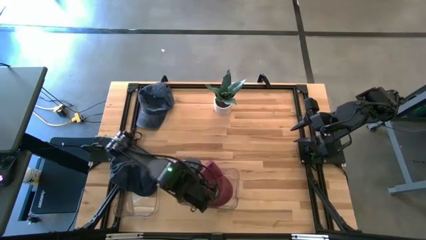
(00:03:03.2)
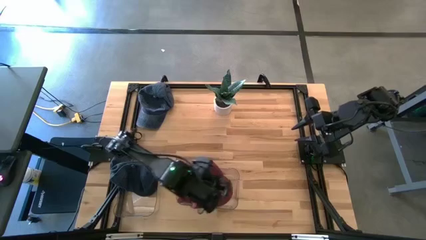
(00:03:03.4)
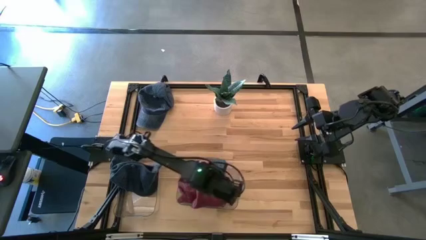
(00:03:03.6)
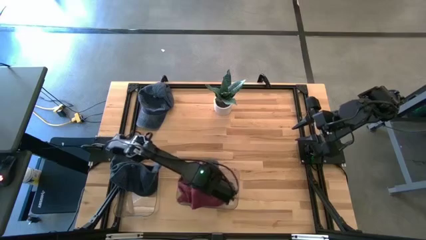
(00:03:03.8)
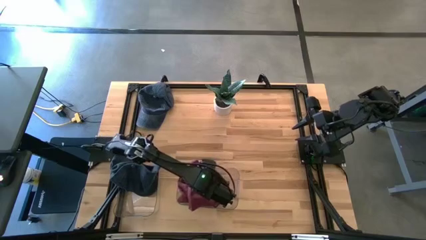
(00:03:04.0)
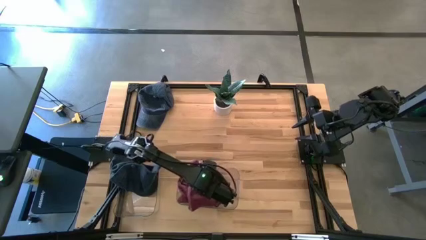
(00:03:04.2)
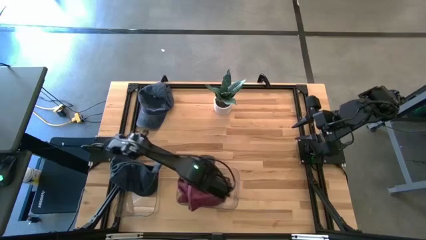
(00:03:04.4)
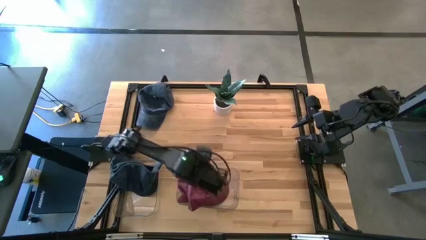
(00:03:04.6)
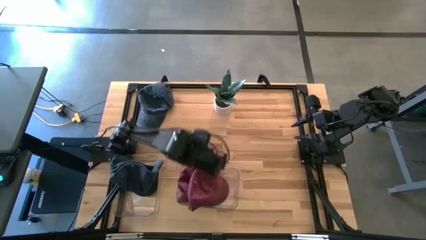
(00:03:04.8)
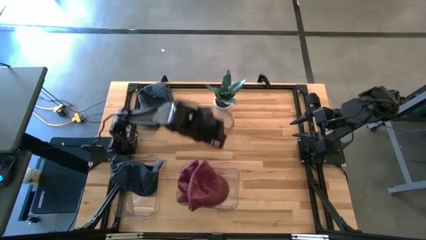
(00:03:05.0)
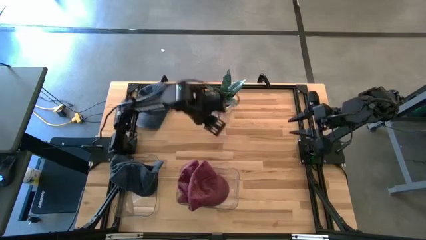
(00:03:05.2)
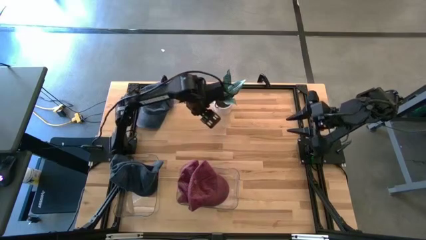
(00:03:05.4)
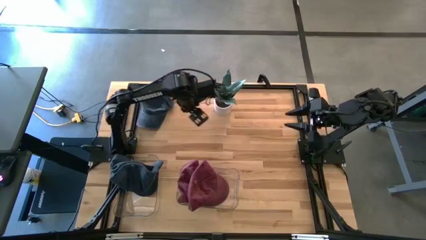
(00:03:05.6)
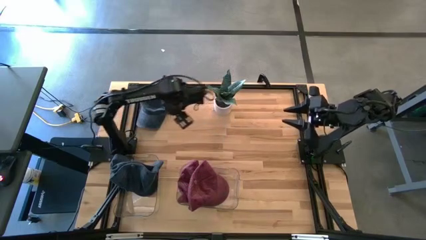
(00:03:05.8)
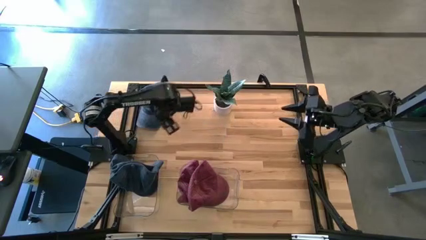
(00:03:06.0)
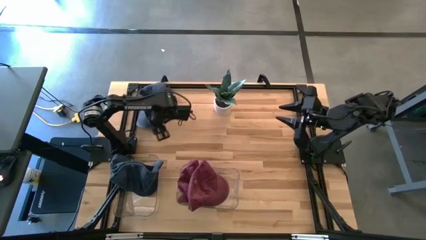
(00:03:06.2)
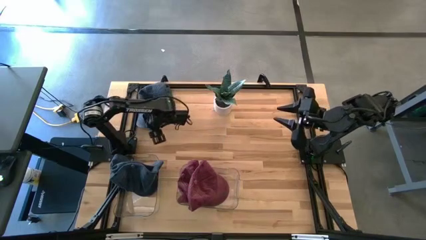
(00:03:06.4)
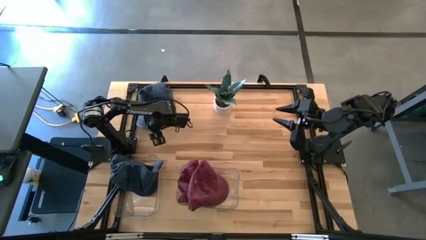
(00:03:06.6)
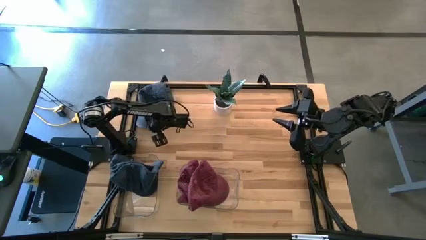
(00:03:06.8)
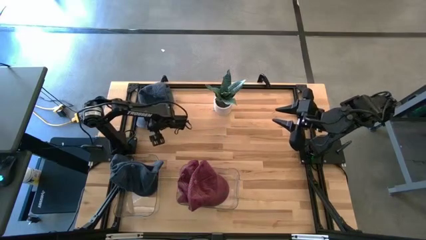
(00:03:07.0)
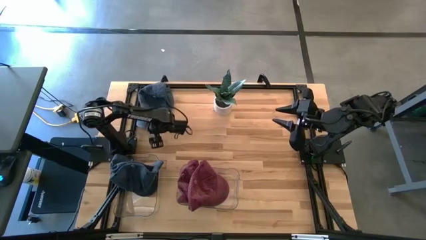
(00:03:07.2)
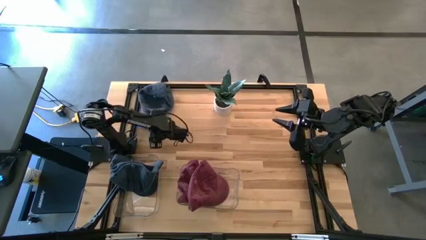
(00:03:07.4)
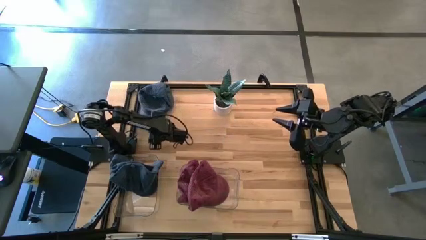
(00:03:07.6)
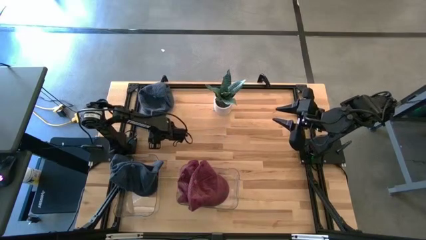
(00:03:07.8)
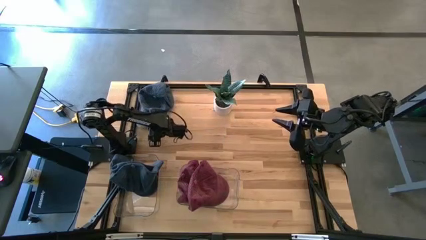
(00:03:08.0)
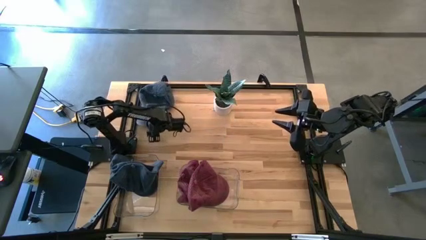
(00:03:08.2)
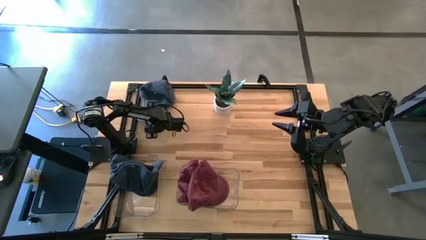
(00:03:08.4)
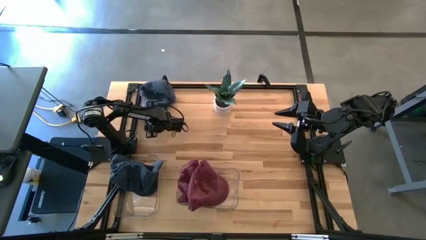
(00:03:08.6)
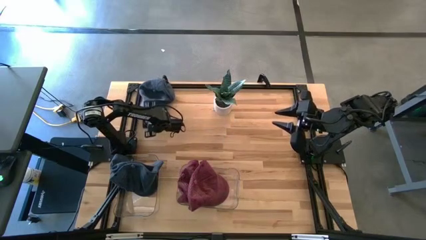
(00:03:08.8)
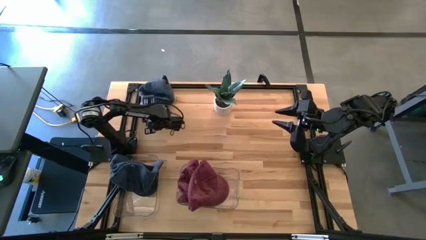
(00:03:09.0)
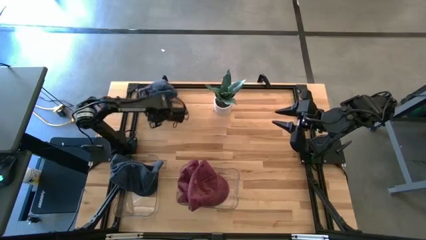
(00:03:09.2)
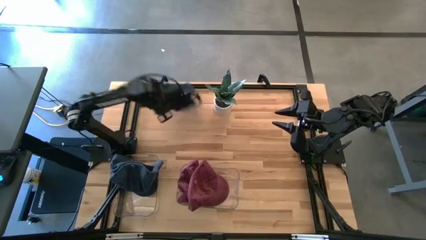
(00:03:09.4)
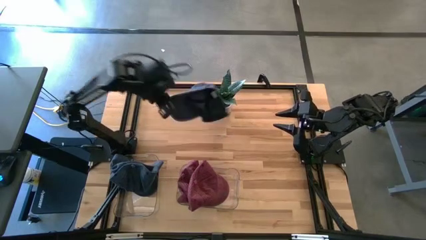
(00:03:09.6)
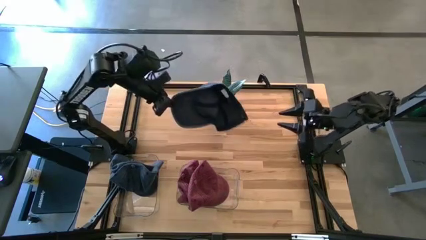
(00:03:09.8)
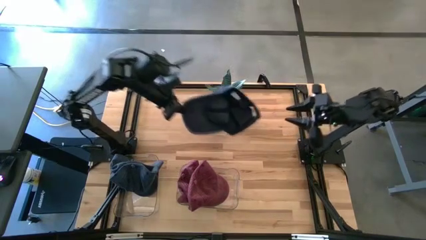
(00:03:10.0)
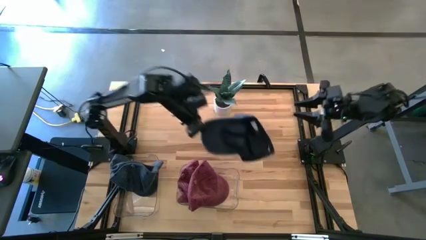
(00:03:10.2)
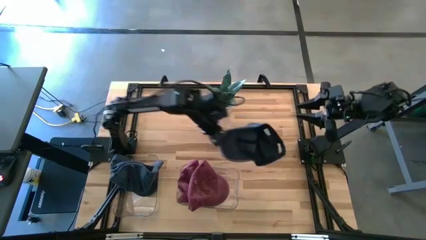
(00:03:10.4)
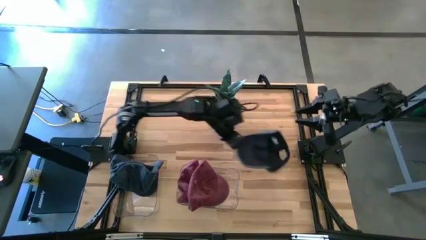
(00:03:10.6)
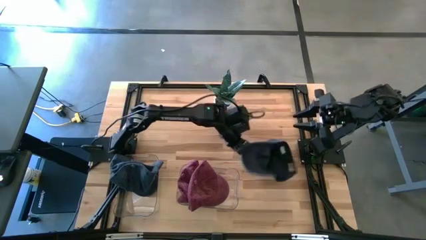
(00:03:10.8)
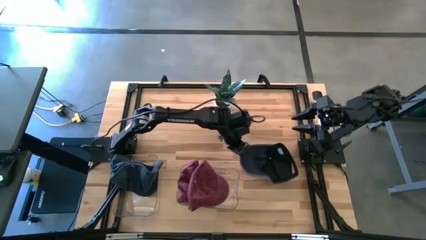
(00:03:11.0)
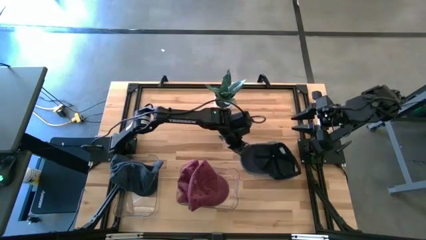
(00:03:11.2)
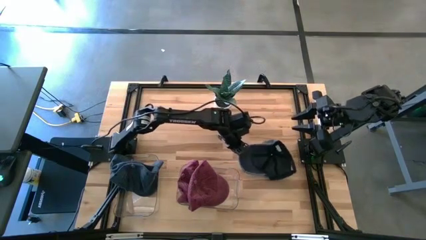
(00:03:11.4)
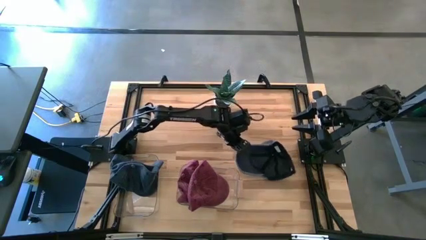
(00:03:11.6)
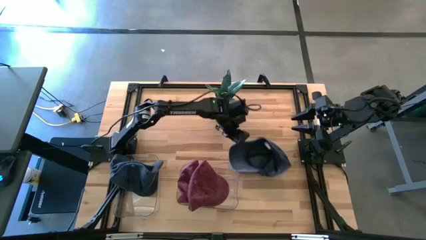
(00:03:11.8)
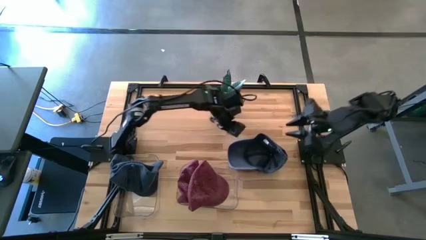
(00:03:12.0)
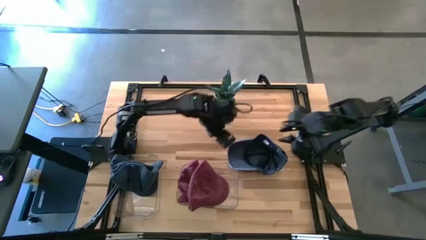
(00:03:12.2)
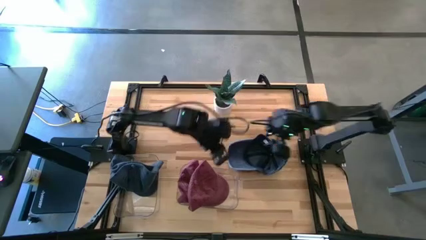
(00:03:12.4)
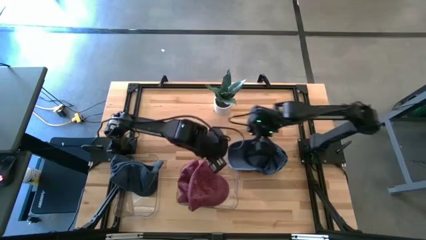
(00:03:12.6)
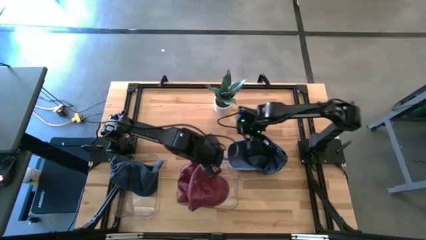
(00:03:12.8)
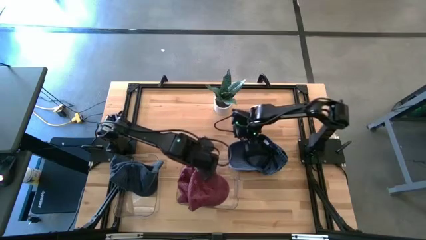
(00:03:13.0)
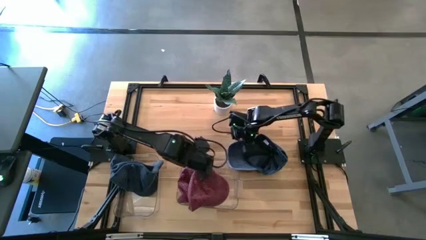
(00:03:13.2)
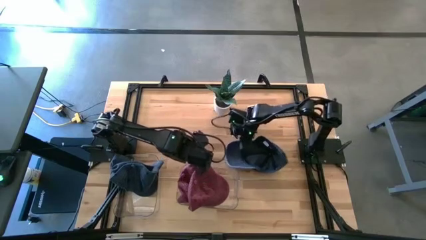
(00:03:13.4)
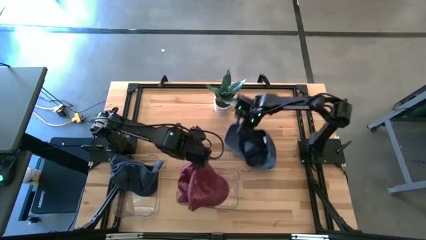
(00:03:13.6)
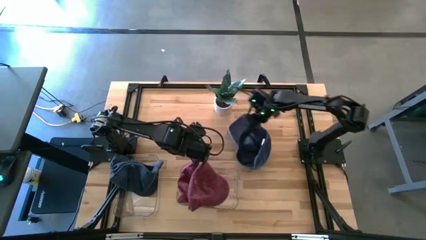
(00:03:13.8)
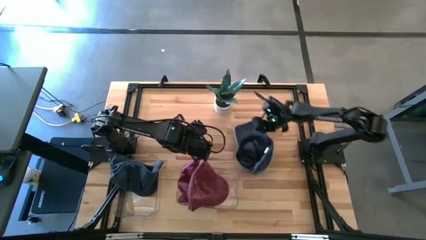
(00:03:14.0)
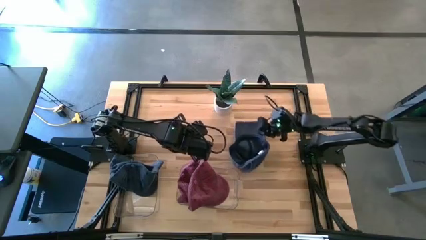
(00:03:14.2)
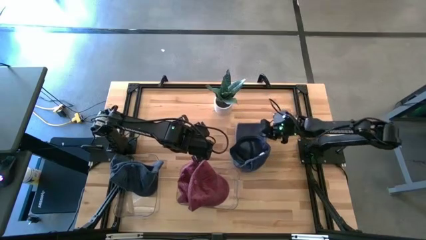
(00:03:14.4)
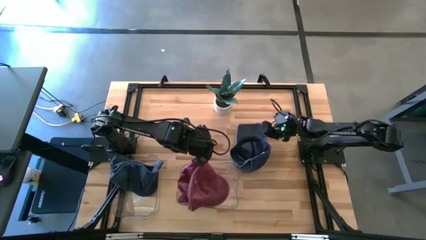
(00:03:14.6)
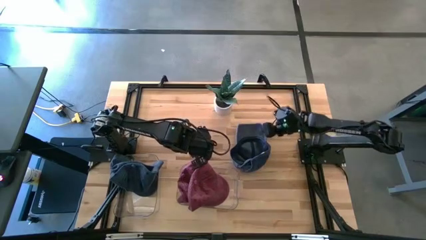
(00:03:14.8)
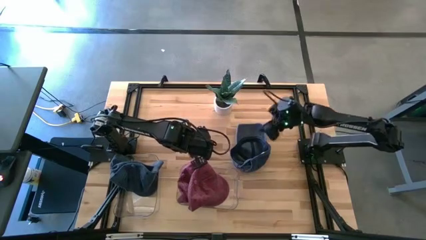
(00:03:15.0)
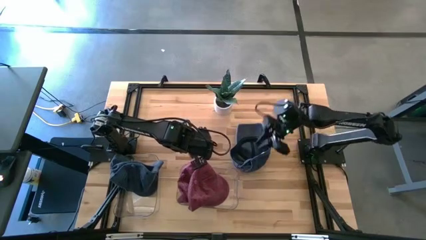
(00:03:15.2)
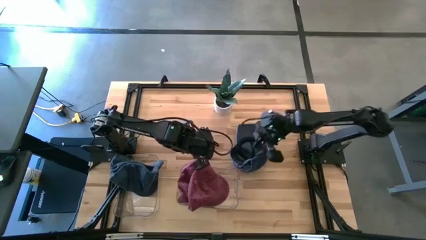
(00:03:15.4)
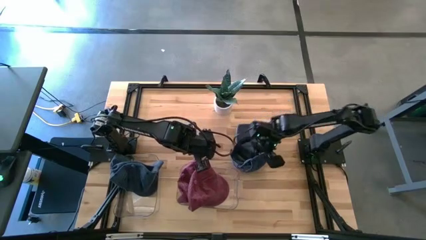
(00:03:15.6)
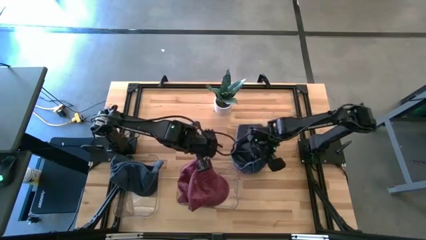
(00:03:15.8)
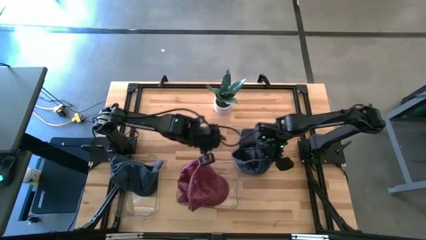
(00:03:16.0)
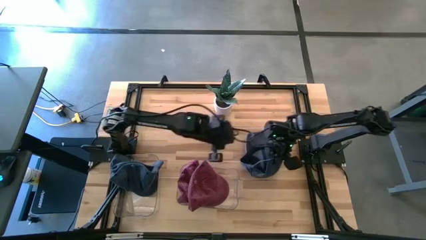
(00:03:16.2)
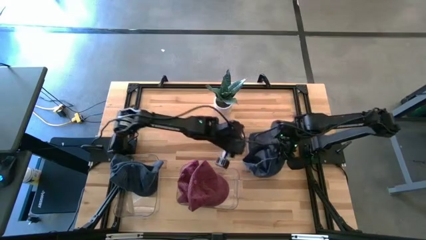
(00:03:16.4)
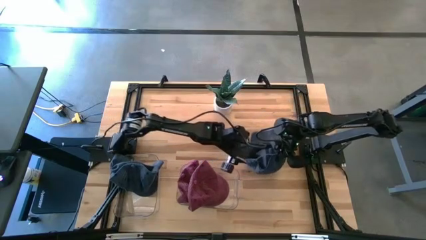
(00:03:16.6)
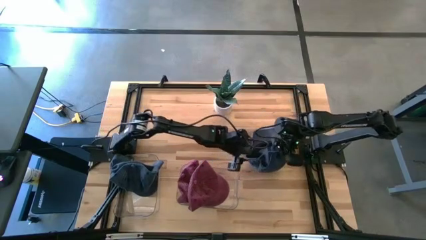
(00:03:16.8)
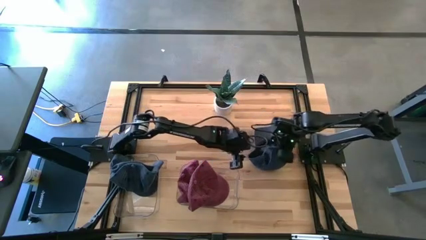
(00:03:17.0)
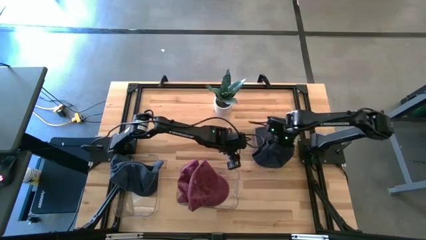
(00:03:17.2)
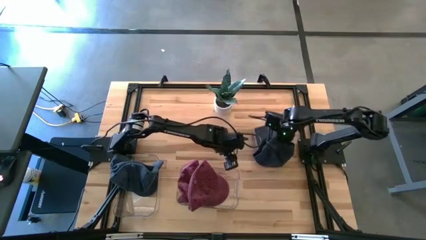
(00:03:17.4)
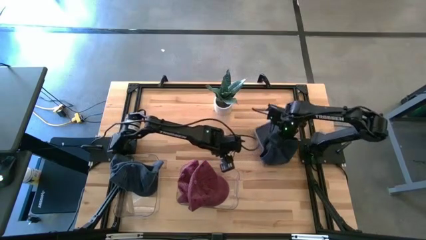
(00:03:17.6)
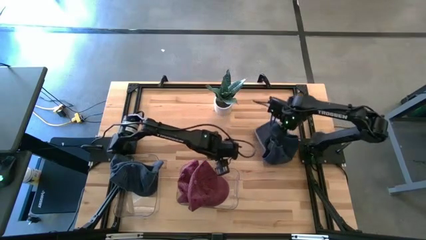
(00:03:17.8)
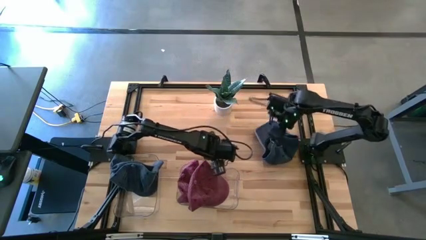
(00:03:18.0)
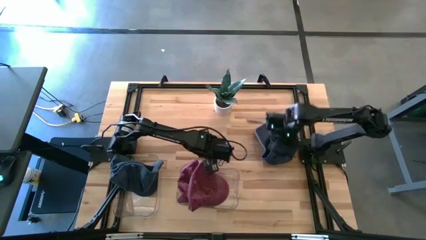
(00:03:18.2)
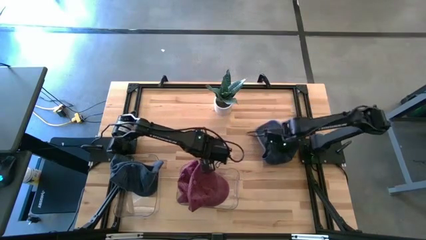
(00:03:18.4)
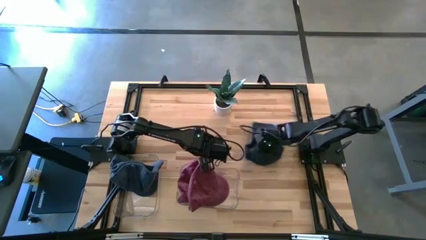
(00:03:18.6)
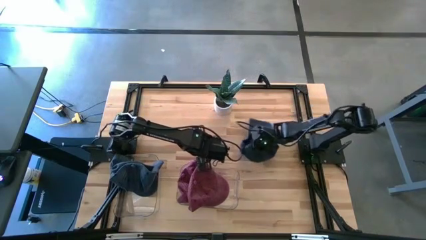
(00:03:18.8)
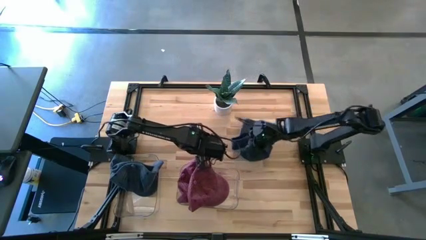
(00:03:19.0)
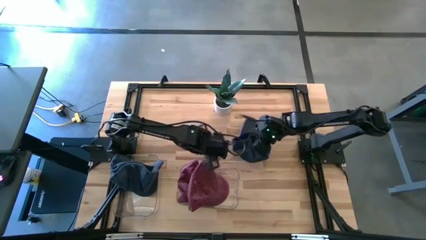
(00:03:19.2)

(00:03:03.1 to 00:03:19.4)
Task: Pick & Place hat
Put the blue cap into the left transparent bin
